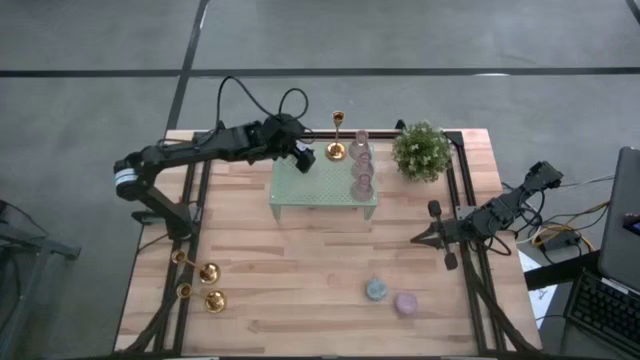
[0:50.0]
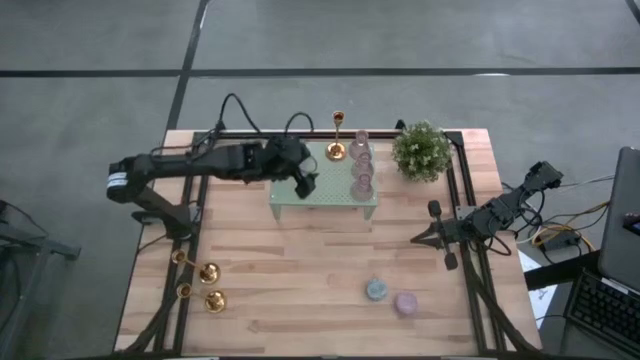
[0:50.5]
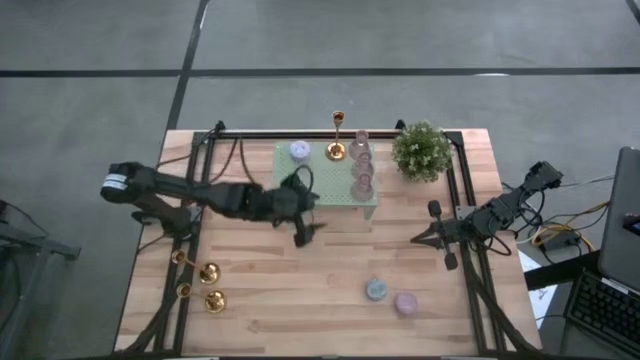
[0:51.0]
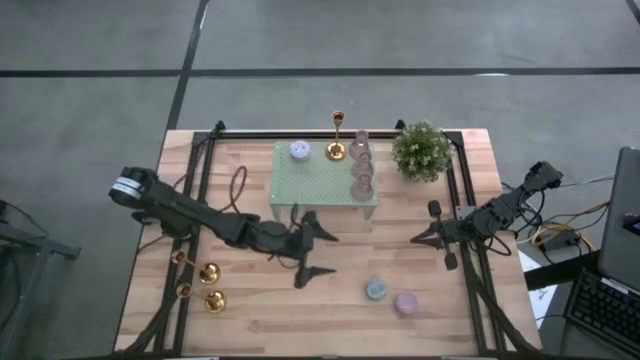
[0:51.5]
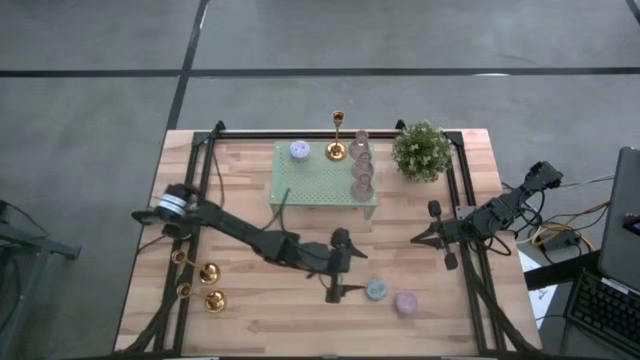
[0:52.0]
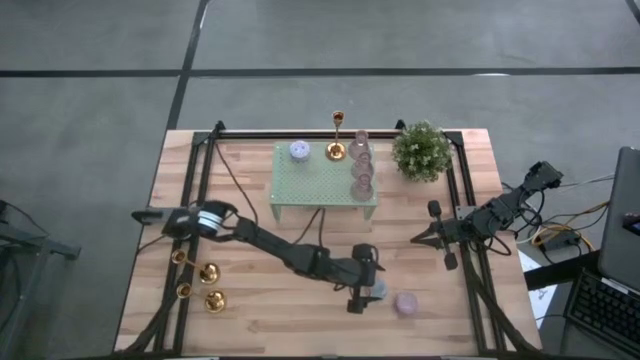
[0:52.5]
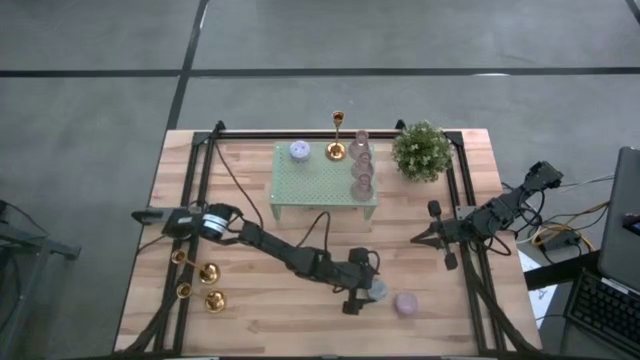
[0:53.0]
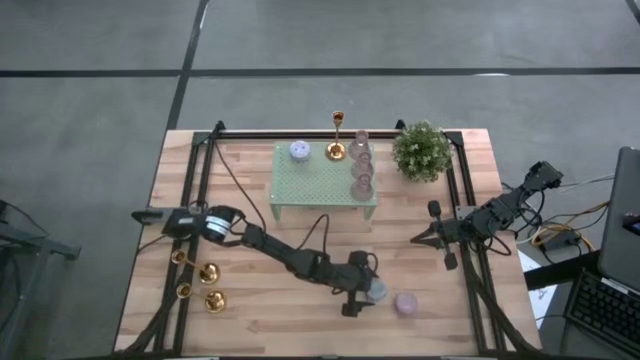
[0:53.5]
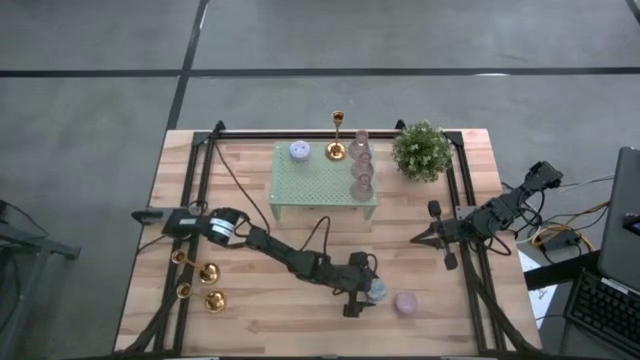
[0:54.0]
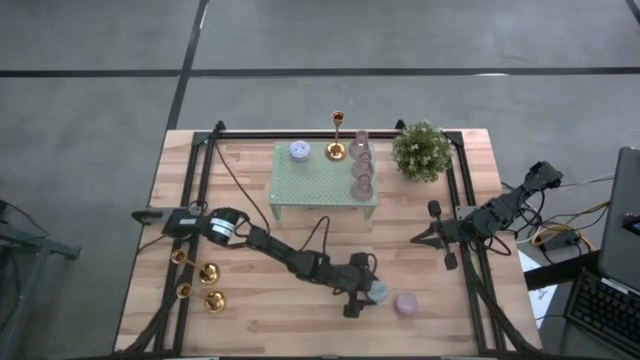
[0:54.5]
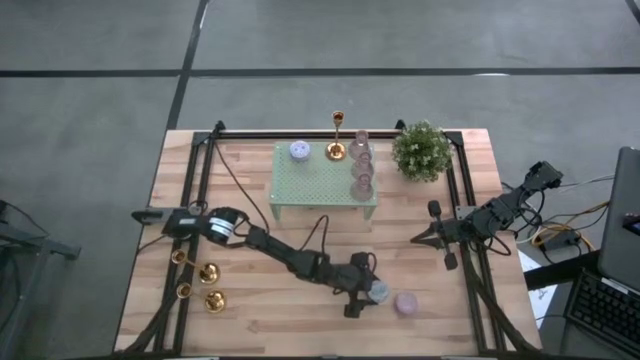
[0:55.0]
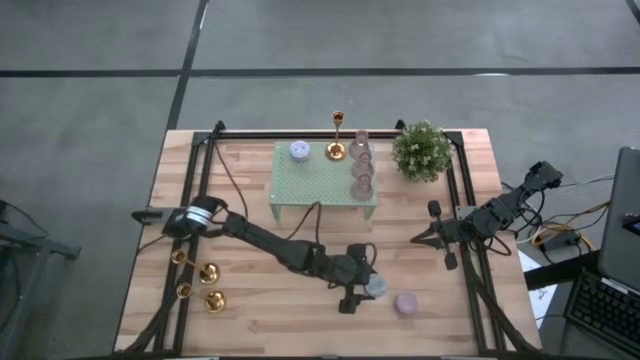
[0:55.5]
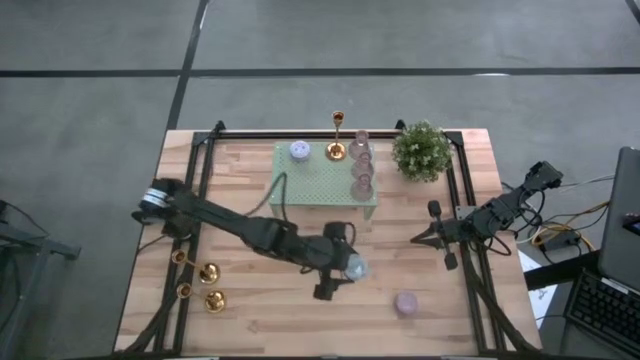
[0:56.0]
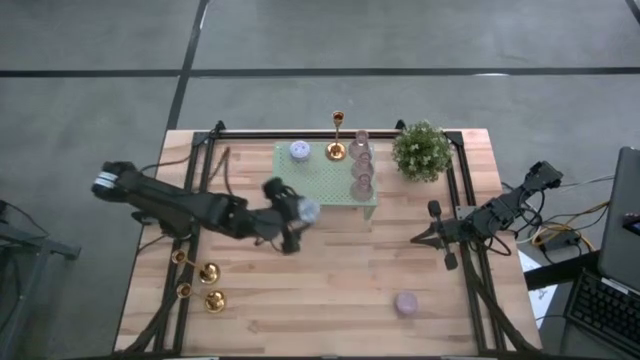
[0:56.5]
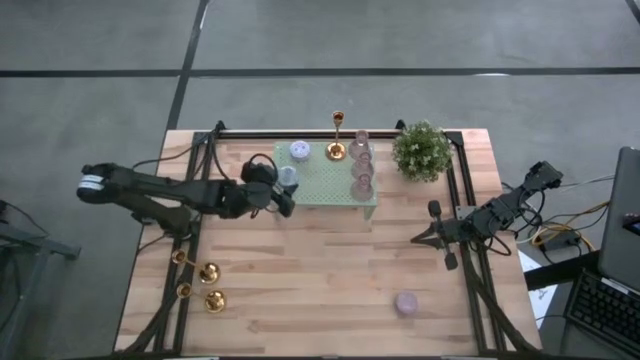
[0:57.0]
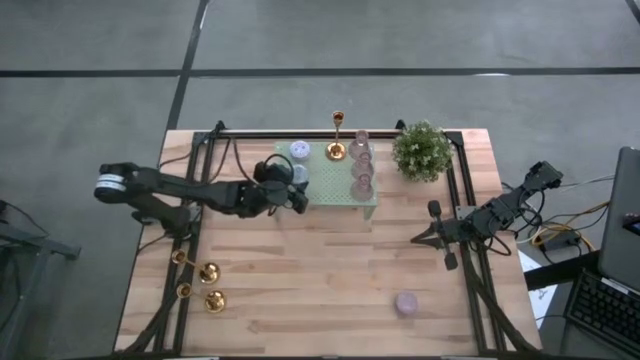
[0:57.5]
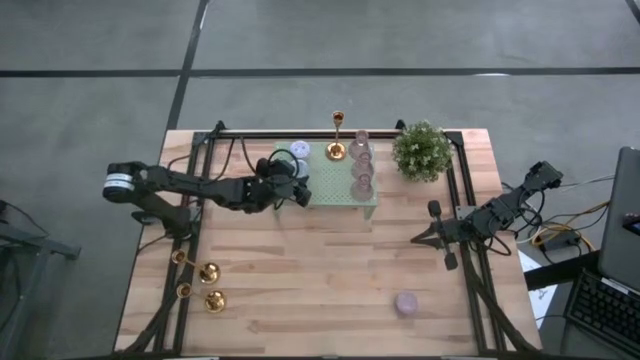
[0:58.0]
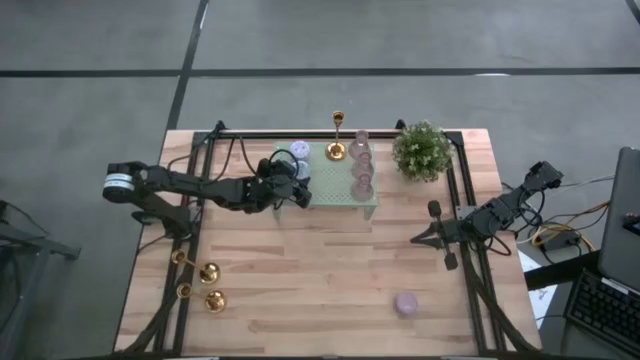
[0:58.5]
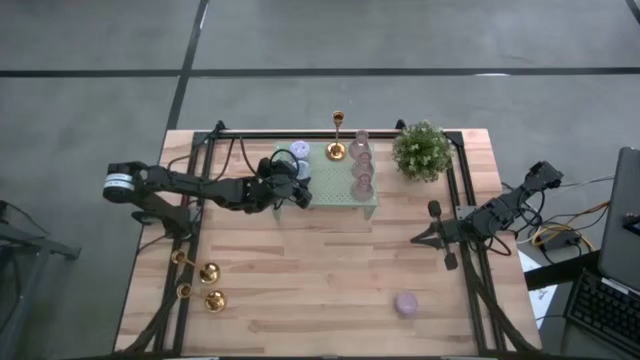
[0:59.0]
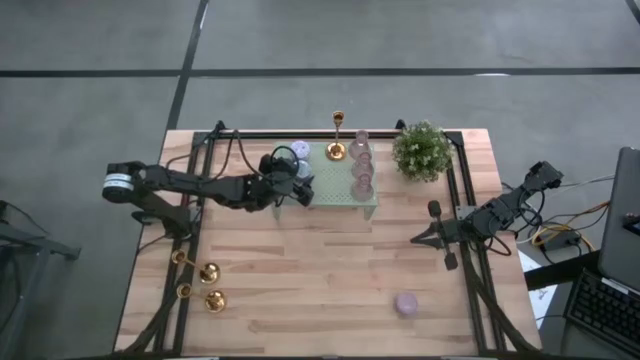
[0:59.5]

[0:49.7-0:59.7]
Task: Pick & Place candle stick holders
Put the blue scented candle on the shelf

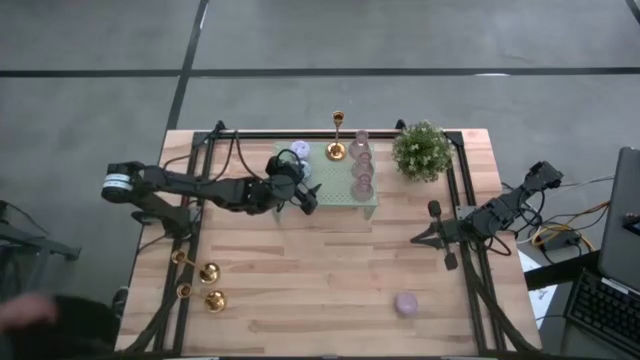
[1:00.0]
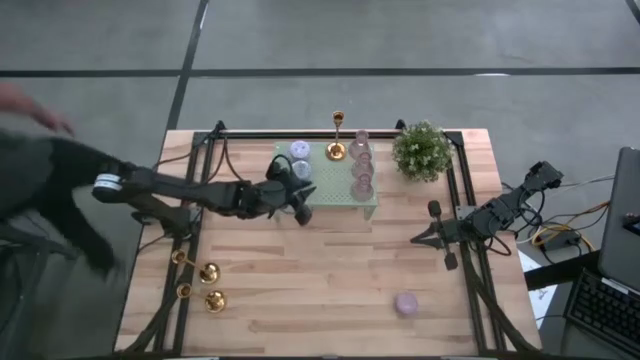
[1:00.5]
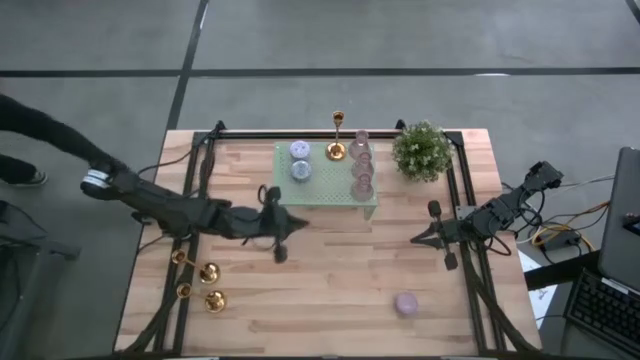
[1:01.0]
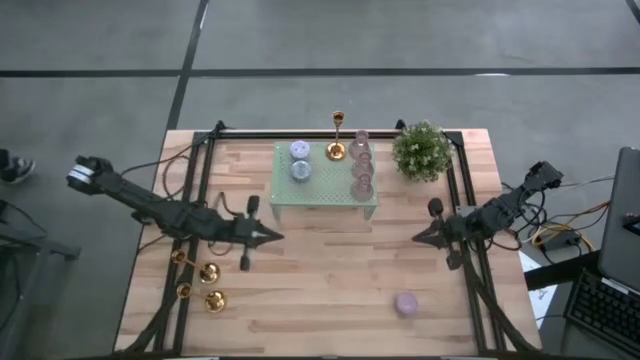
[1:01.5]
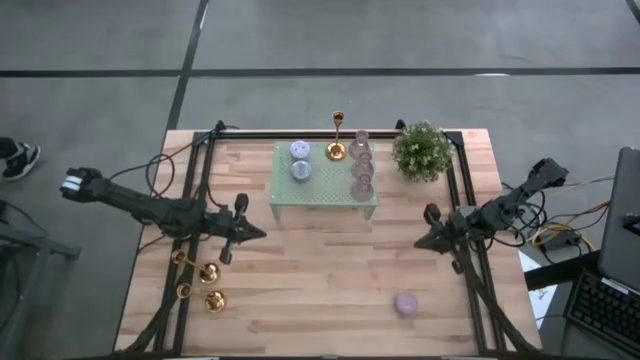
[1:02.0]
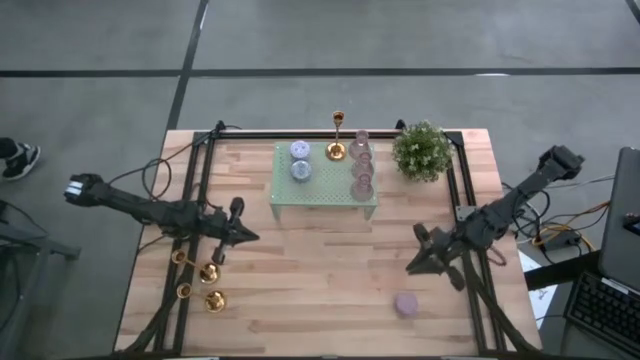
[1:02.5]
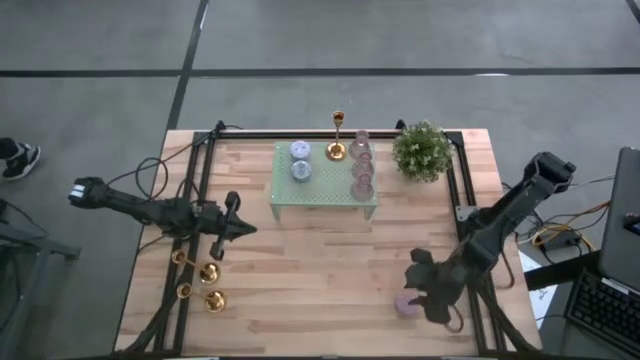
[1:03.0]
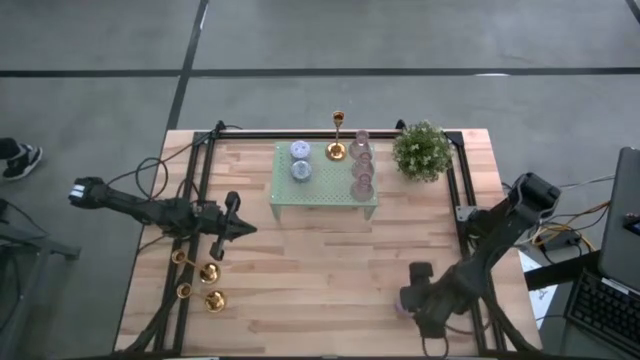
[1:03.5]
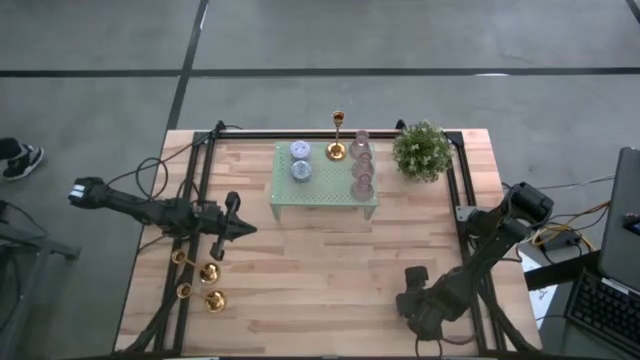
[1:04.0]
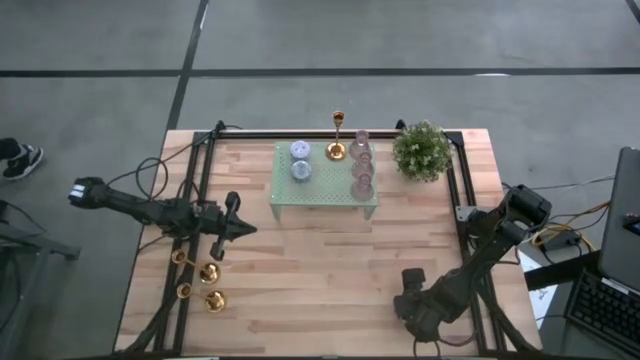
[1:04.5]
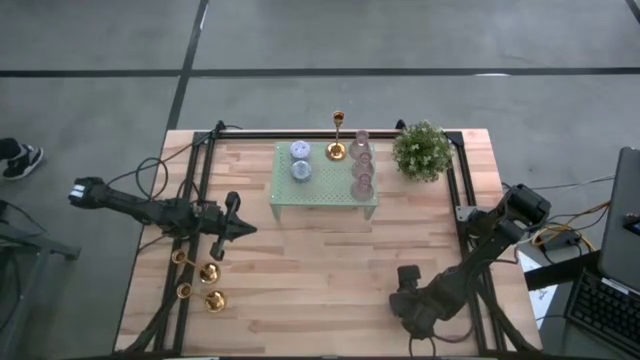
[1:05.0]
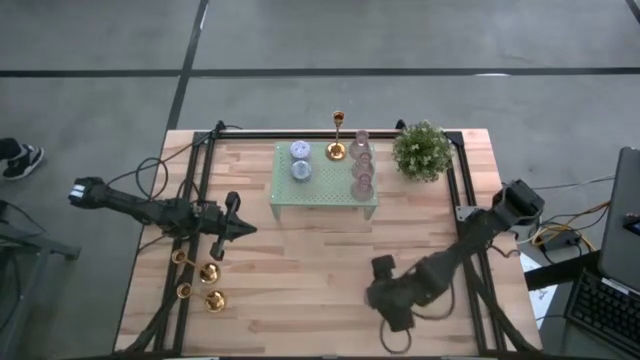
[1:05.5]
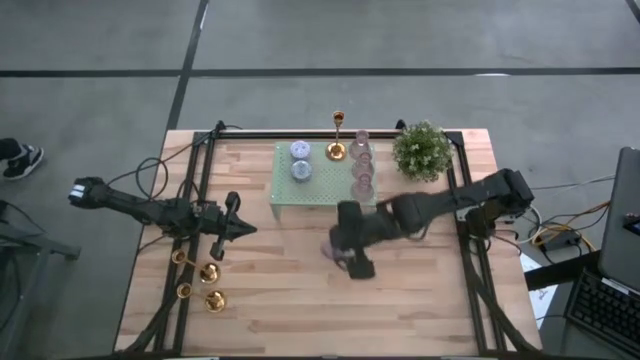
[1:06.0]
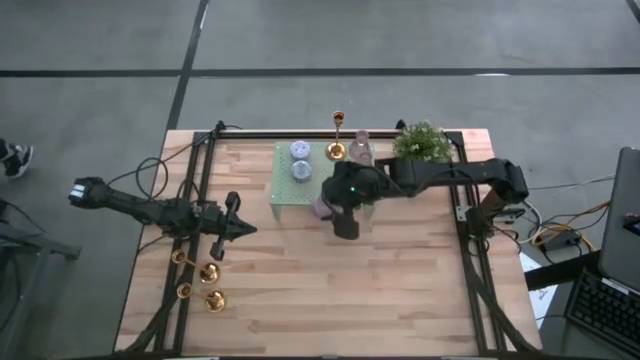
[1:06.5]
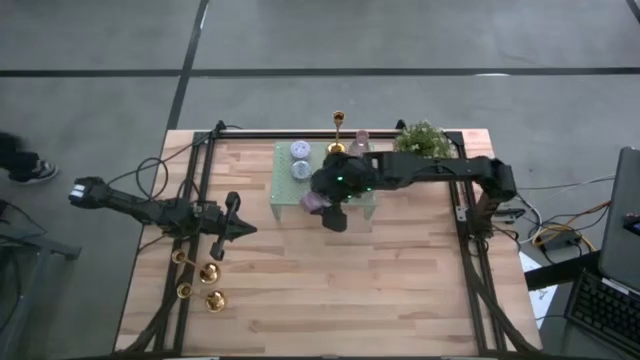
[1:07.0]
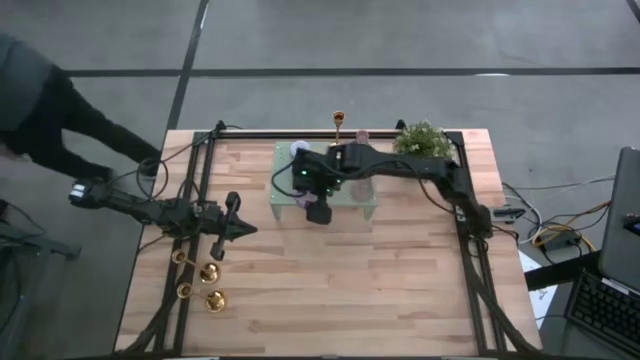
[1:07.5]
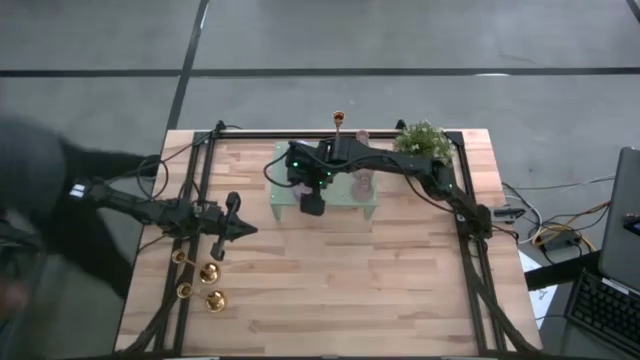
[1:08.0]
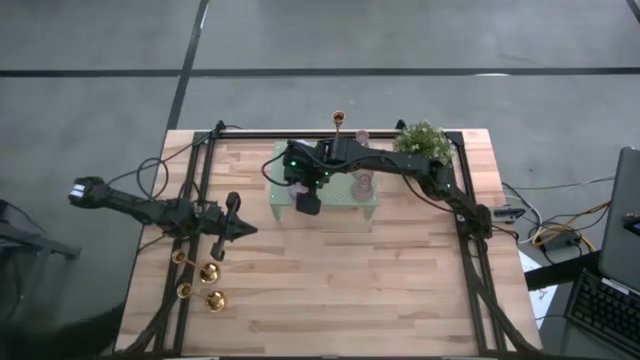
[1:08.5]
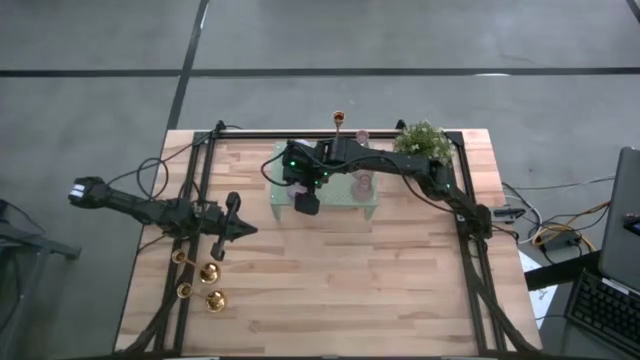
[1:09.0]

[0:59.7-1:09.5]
Put the pink scented candle on the shelf

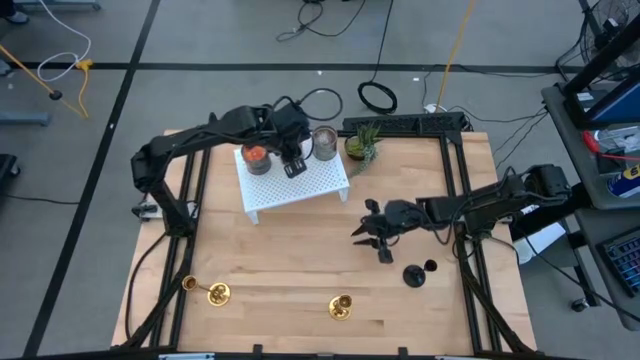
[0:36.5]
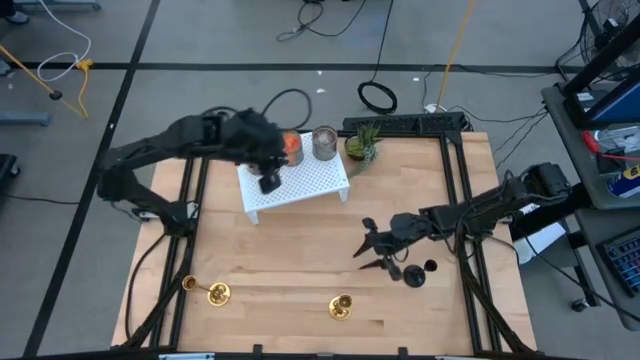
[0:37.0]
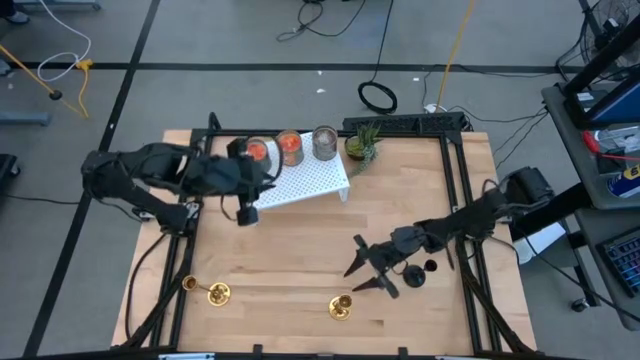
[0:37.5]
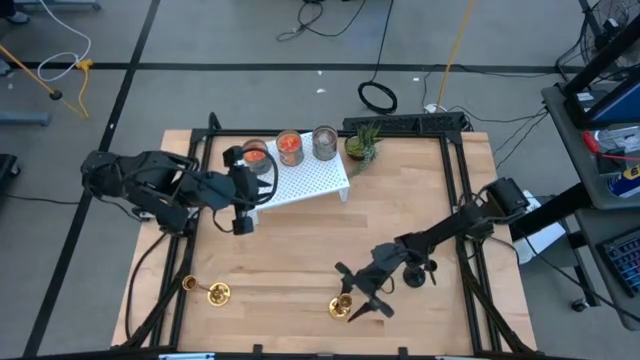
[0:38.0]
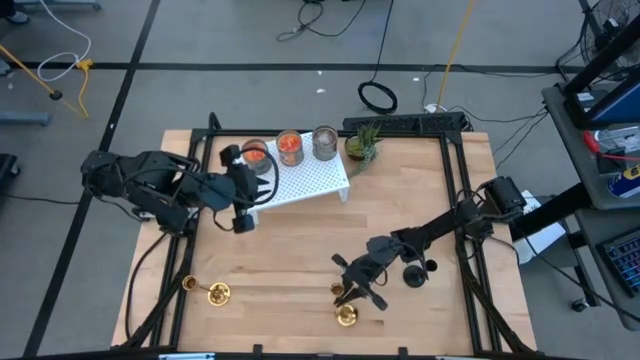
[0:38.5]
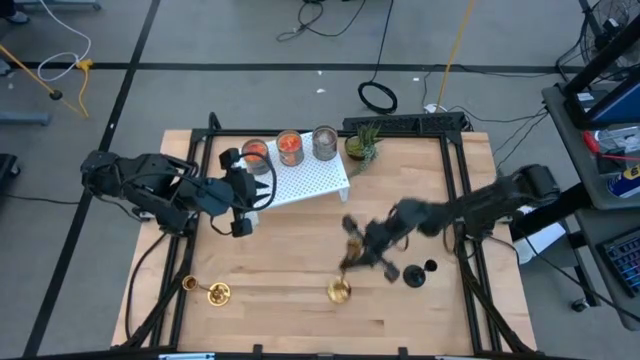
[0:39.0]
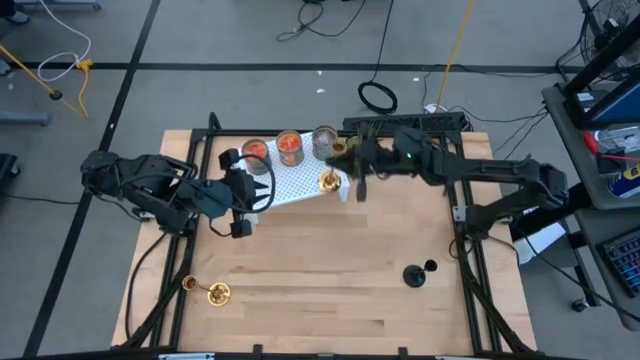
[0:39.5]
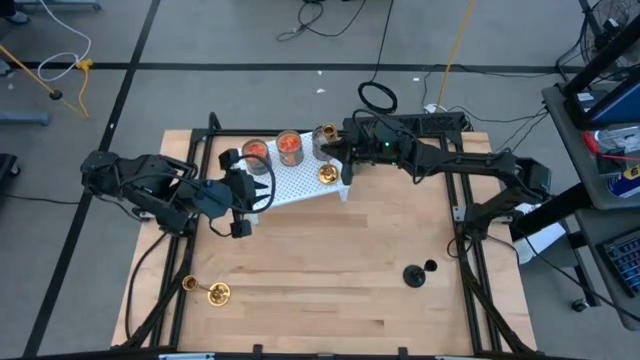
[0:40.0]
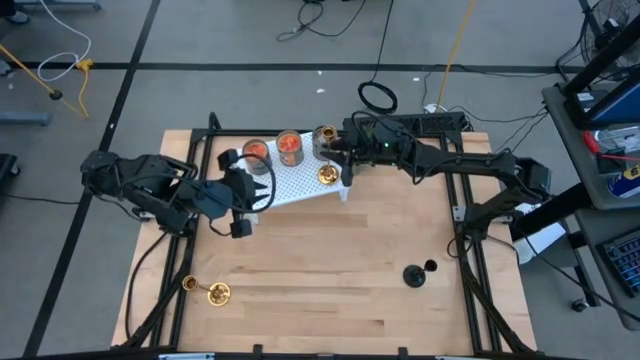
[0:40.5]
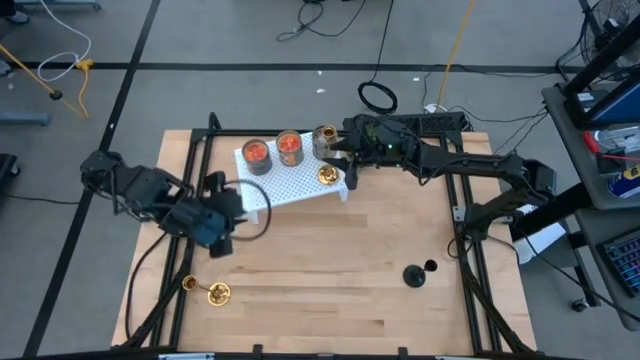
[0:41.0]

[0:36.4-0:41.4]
Task: Pick & Place candle stick holders
Put the right gold candle holder on the shelf
